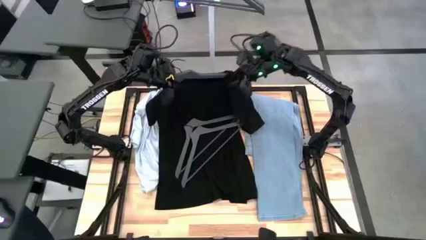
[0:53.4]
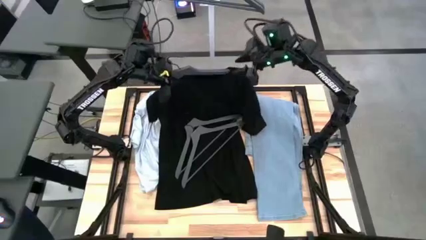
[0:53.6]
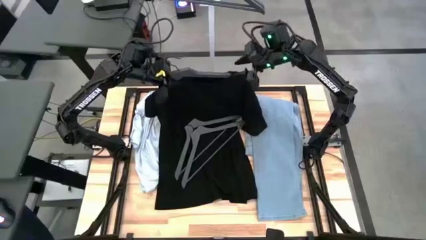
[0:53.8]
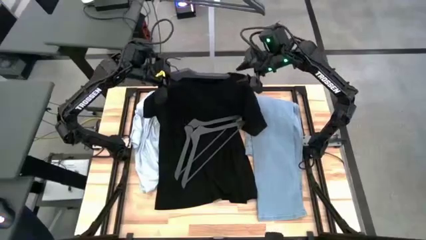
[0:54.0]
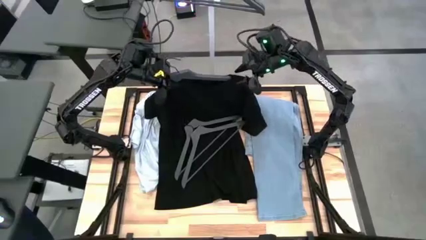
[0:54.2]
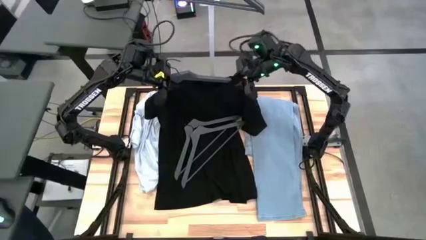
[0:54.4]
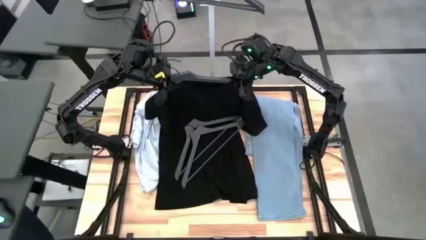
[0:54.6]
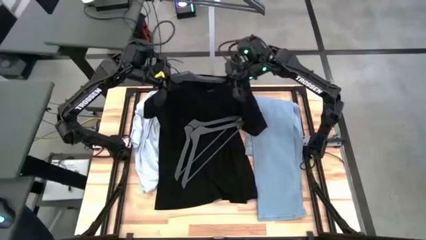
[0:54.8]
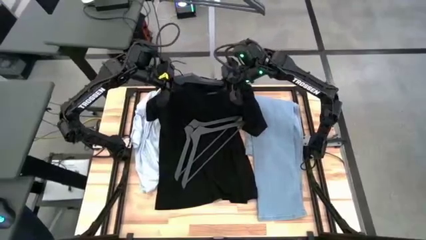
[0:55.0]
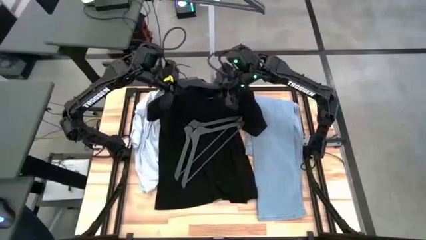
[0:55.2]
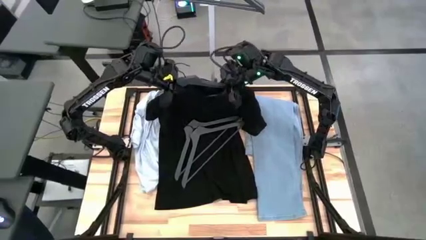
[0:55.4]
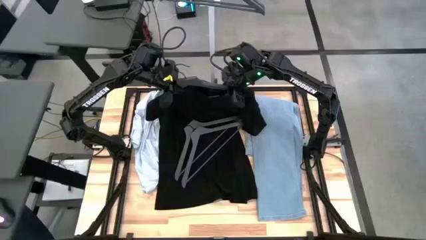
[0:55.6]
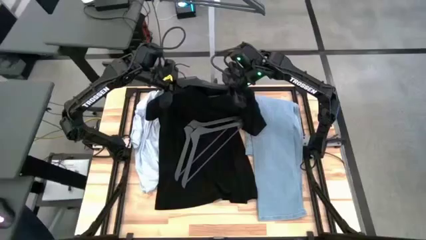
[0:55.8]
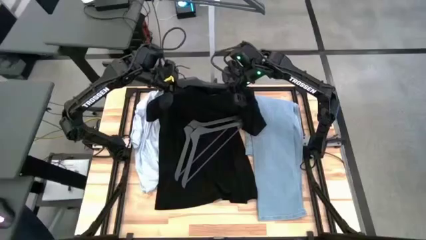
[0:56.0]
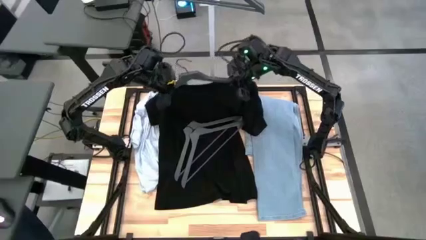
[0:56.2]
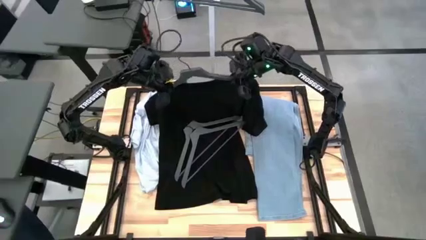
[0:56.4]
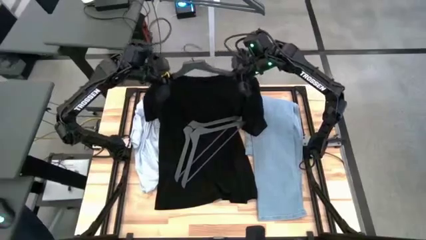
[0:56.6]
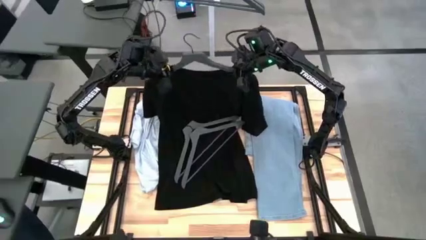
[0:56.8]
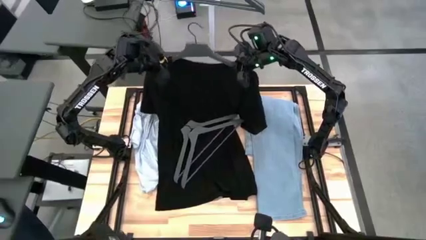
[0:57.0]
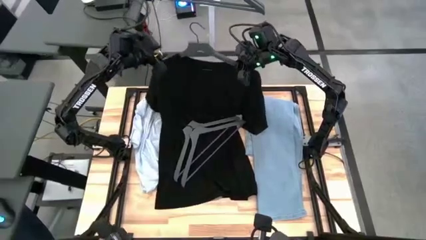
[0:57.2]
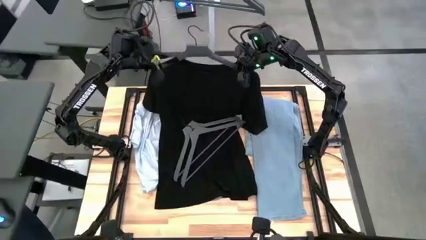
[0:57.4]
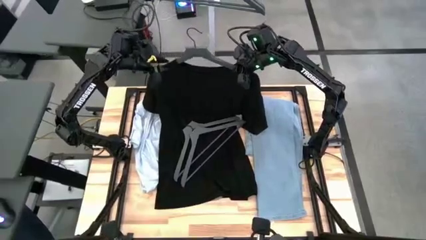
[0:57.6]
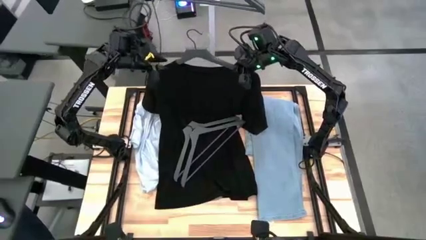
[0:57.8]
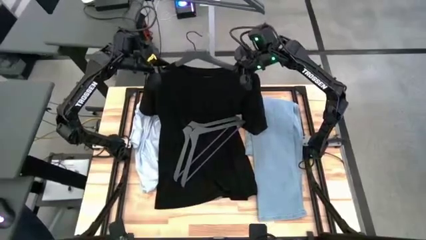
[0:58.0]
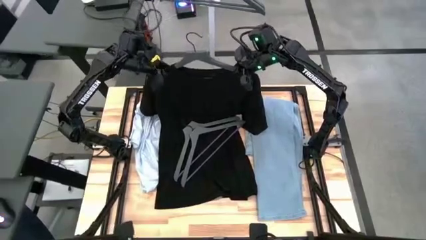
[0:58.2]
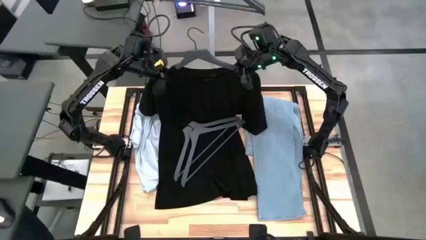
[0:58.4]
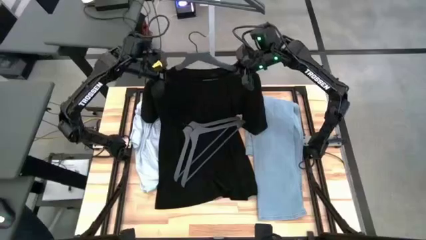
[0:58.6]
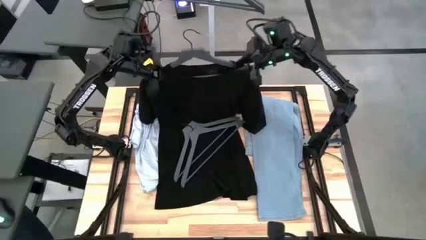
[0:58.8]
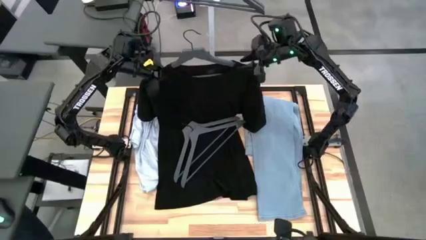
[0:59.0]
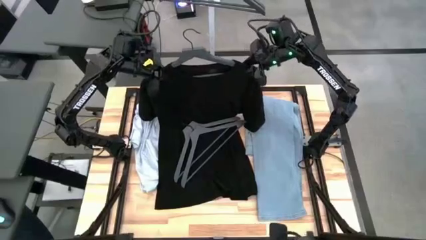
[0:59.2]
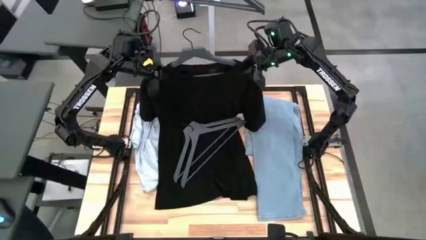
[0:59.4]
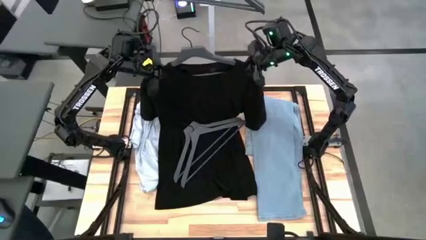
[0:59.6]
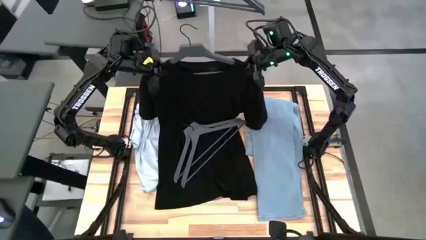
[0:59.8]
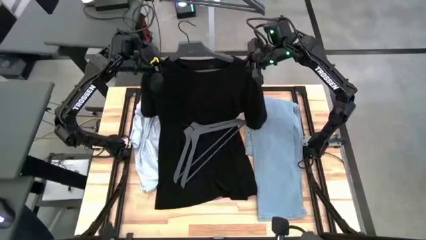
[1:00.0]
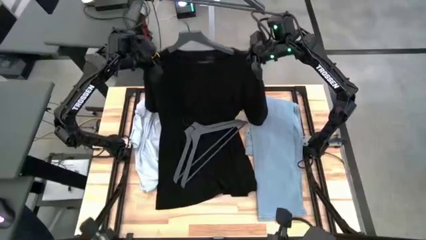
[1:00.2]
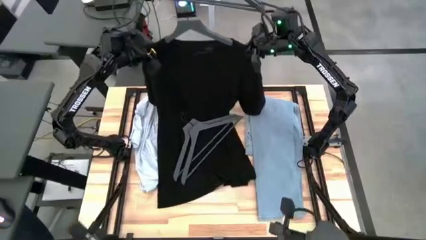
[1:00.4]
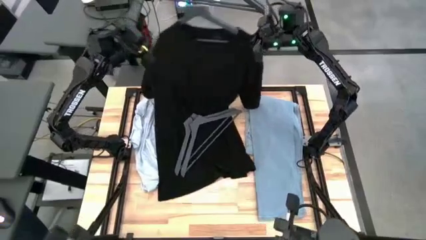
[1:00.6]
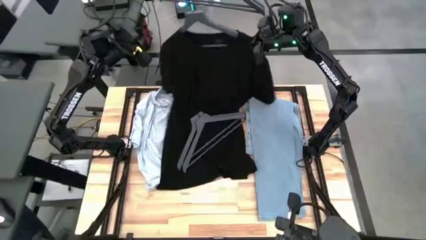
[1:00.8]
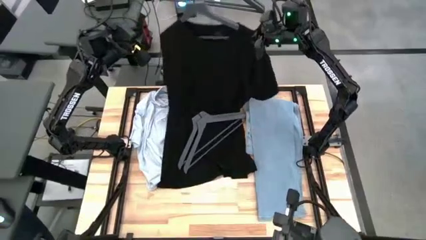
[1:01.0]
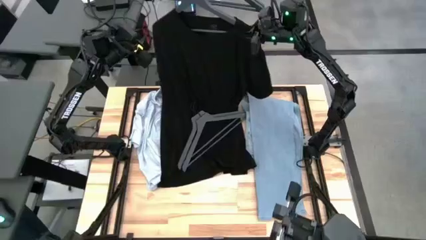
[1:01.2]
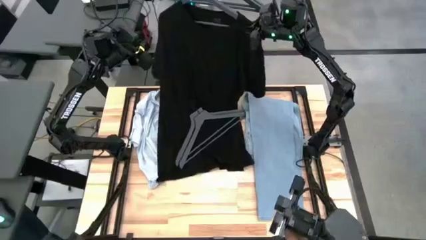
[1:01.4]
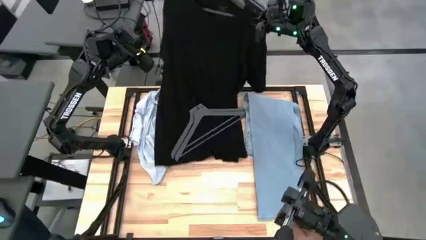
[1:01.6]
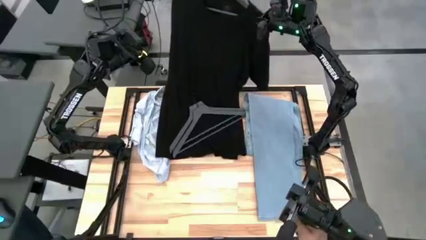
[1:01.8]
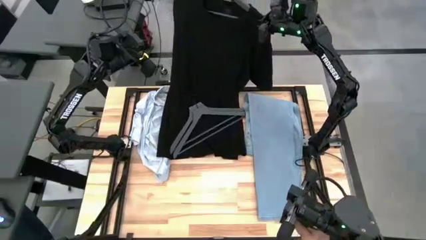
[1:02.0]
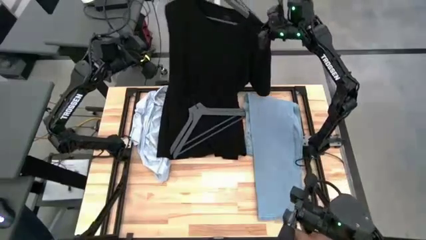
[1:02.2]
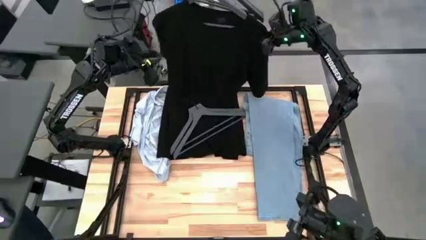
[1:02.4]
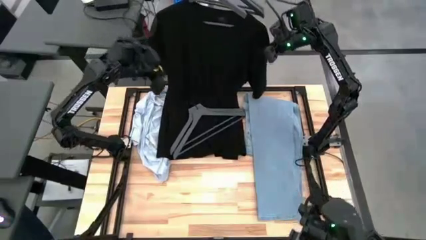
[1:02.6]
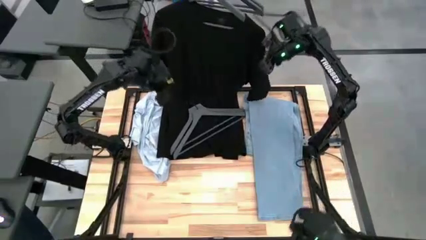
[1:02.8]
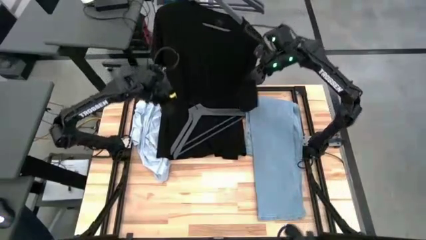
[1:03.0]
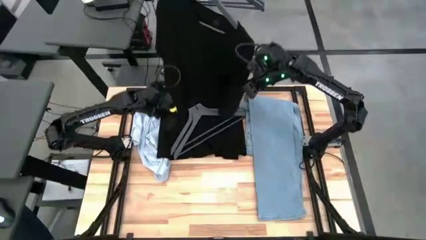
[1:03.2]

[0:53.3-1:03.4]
Task: Hang clothes
Hang the black shirt on the rack

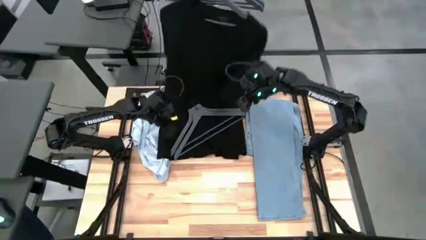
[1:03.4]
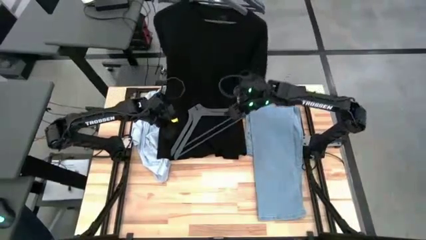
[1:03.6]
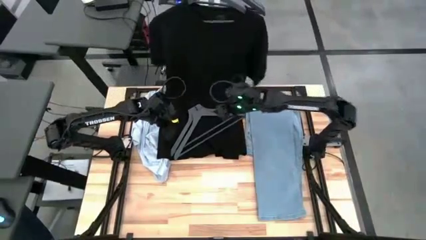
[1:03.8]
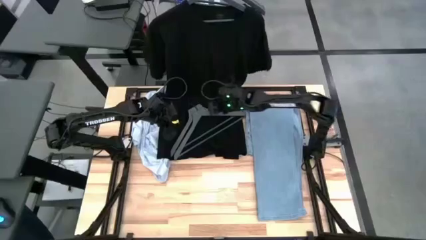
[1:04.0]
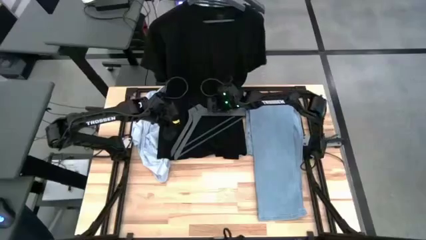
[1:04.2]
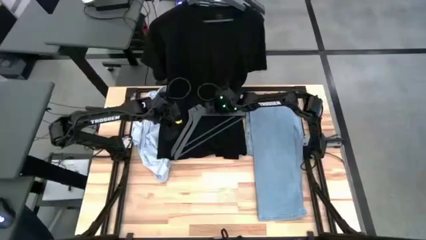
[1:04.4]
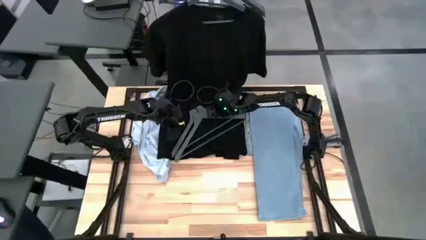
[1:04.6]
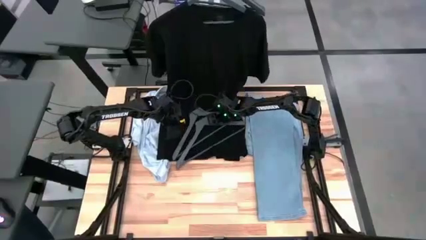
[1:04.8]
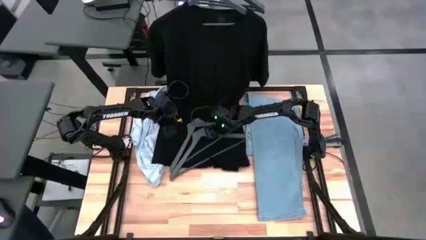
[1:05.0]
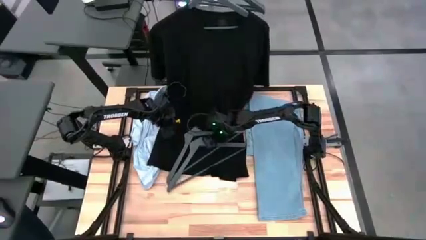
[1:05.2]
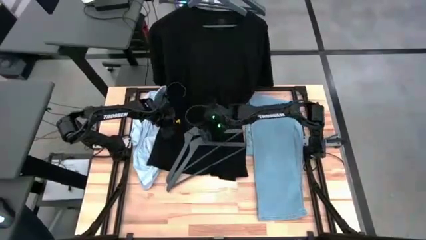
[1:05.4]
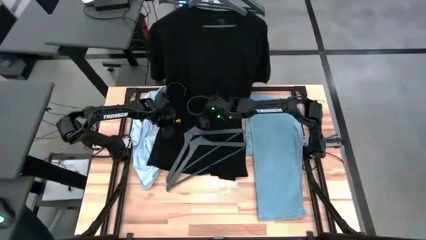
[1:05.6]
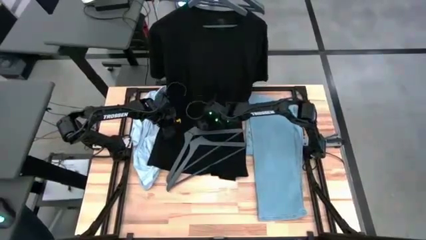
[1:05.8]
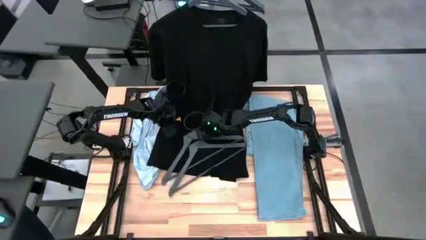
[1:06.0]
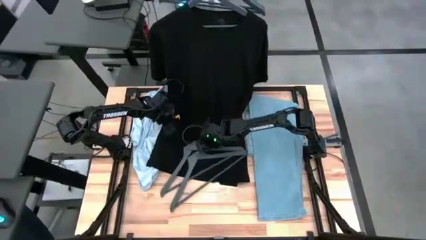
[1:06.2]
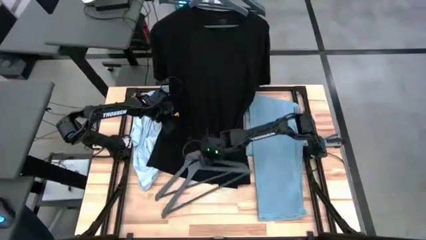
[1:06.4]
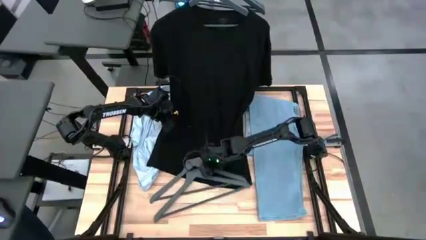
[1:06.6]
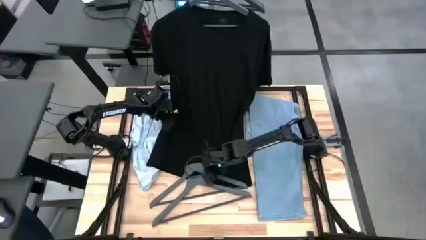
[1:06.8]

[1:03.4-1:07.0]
Adjust the grey hangers

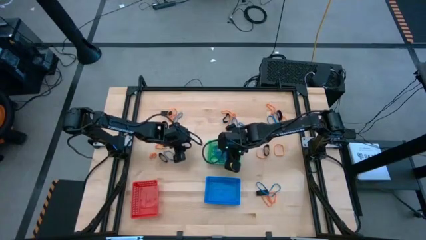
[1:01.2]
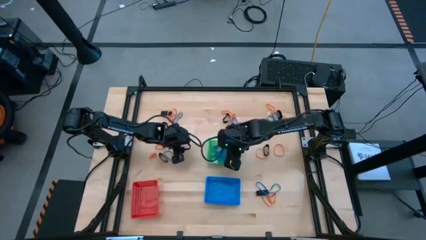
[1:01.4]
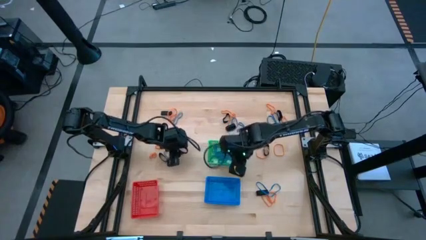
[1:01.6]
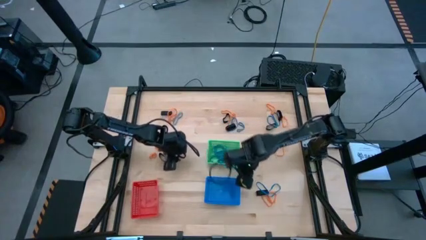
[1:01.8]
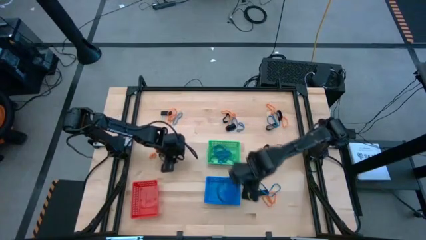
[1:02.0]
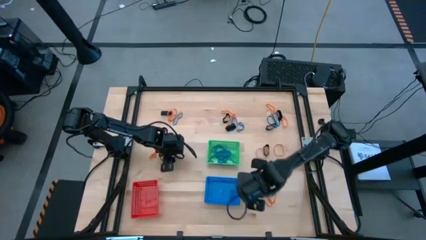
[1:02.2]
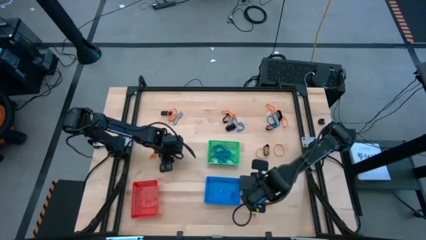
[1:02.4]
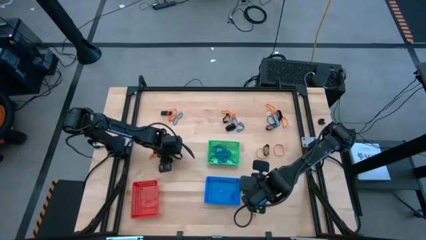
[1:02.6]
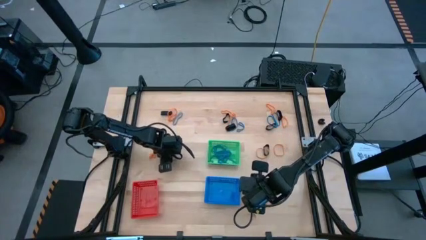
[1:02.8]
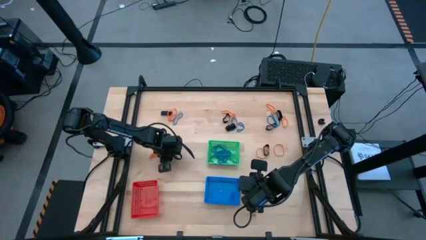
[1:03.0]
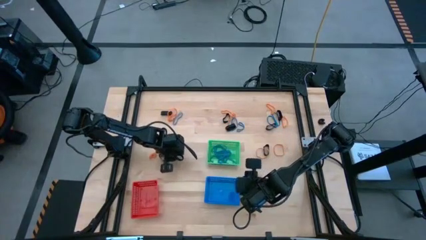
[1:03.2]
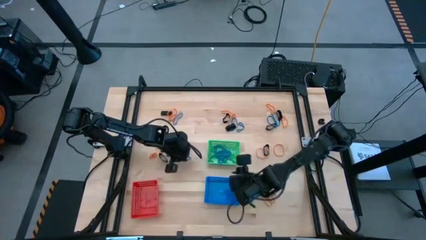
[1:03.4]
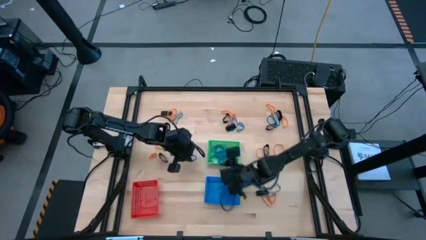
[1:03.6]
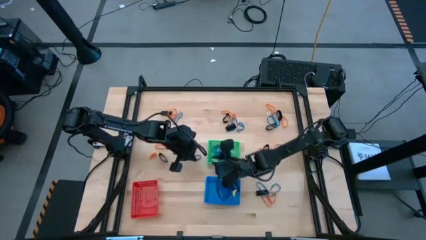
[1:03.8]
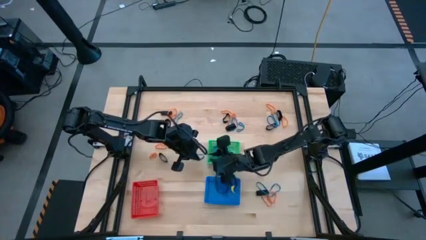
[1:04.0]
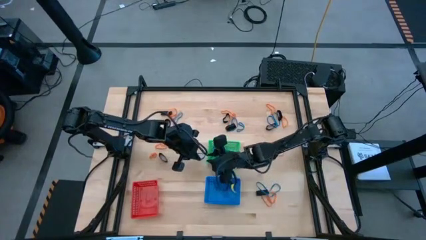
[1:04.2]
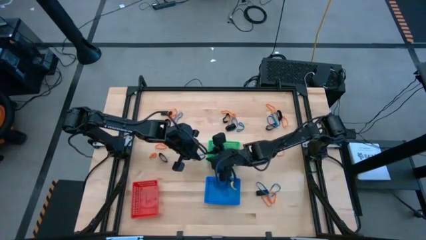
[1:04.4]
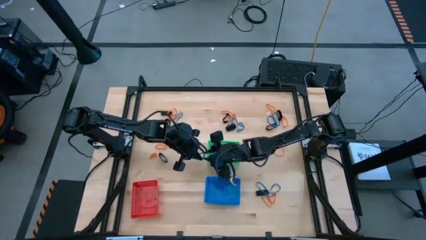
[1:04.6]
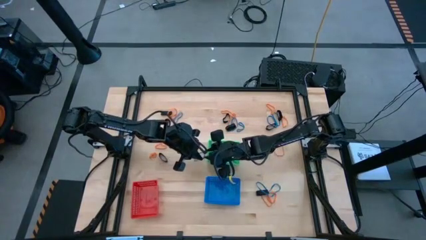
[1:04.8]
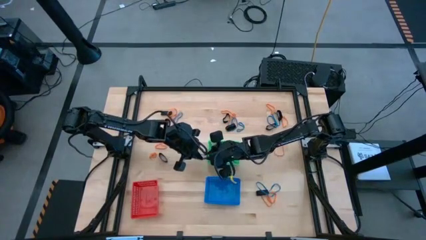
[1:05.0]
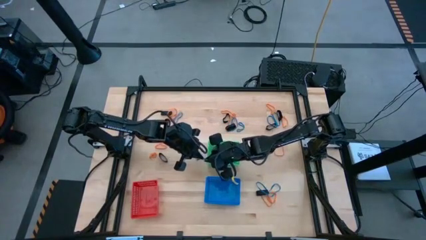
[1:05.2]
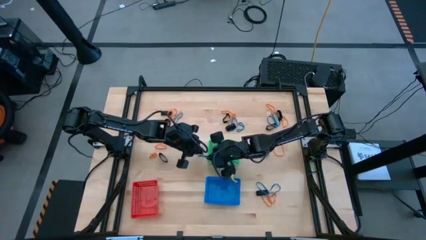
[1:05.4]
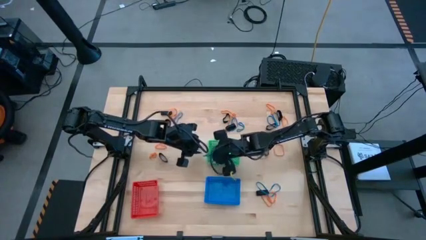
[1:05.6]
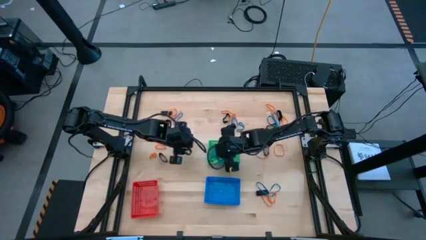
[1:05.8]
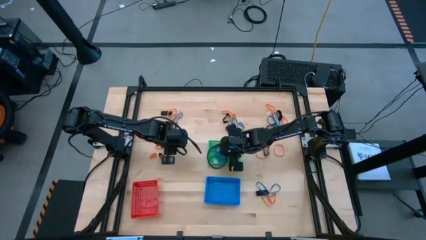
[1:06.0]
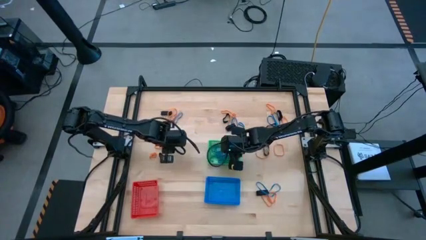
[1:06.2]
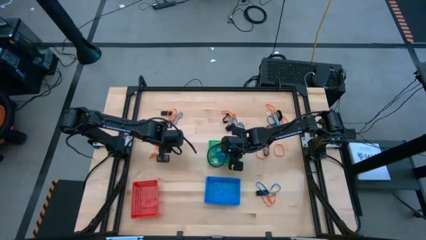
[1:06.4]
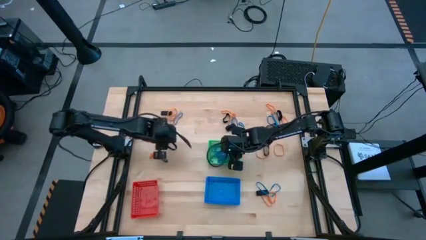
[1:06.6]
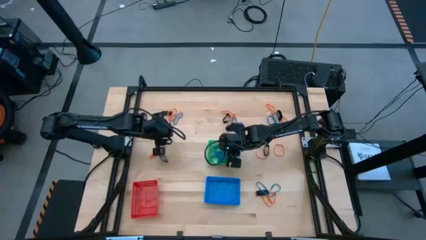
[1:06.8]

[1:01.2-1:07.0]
Task: Sort rubber bands into baskets
Put the blue rubberband into the green bin
